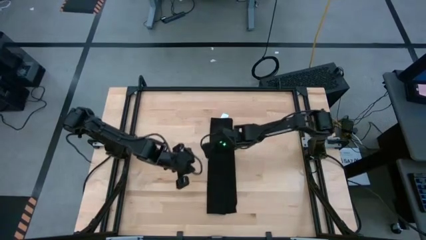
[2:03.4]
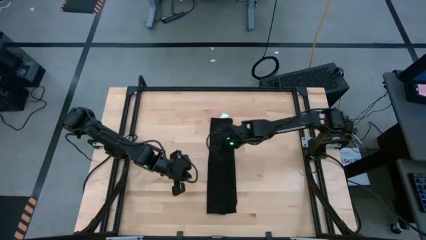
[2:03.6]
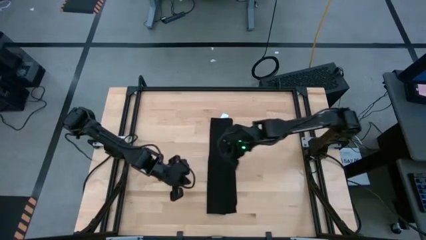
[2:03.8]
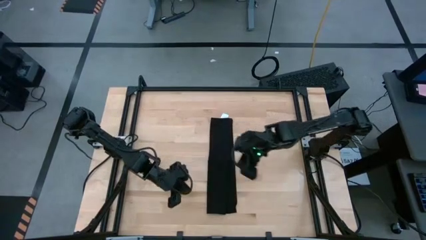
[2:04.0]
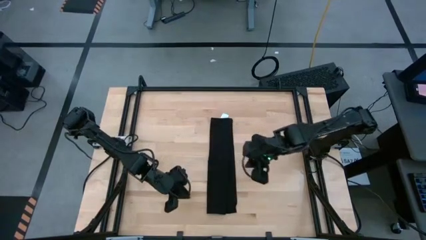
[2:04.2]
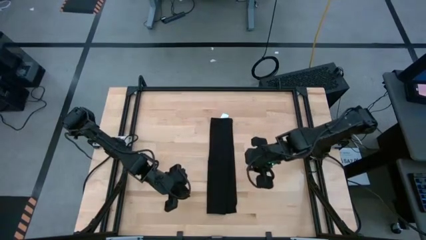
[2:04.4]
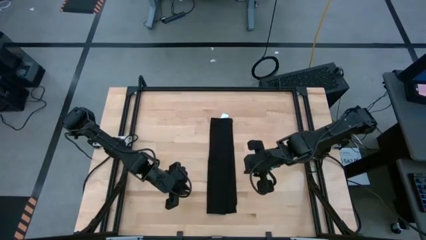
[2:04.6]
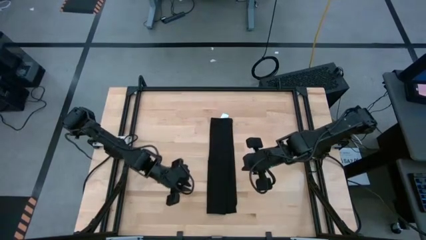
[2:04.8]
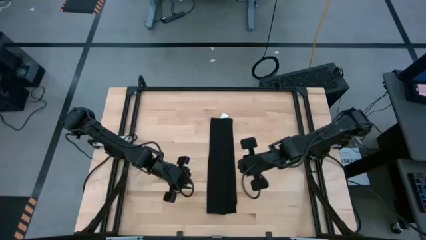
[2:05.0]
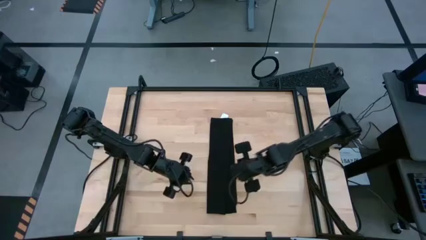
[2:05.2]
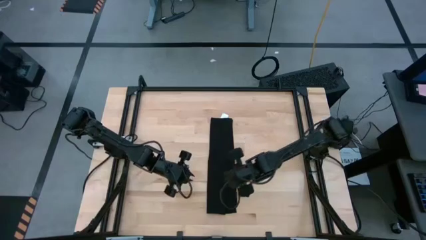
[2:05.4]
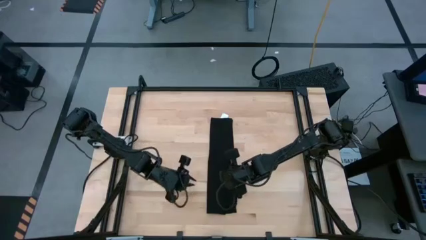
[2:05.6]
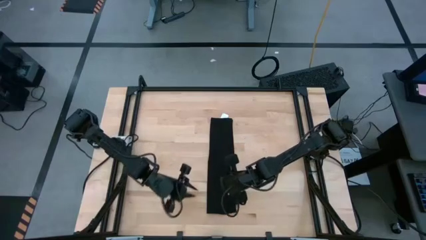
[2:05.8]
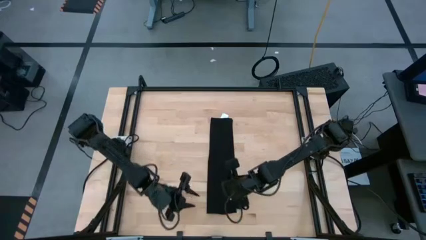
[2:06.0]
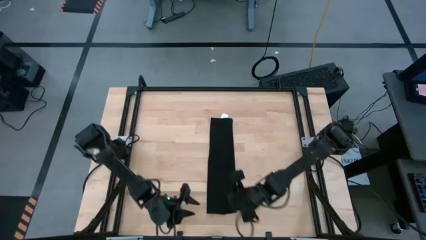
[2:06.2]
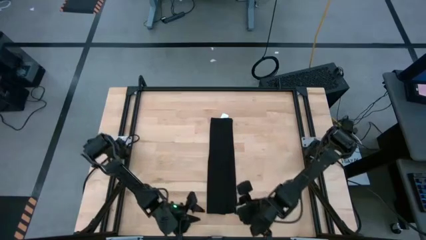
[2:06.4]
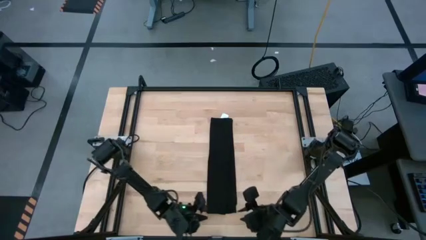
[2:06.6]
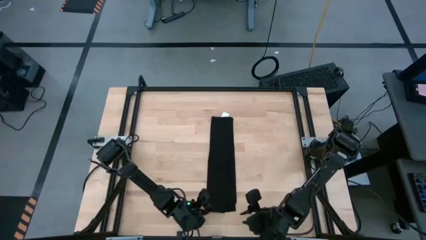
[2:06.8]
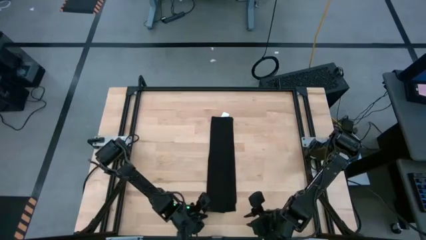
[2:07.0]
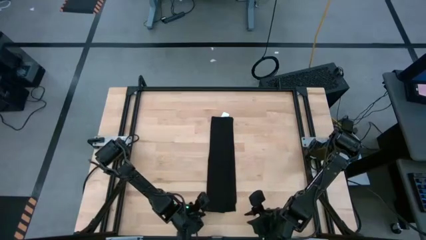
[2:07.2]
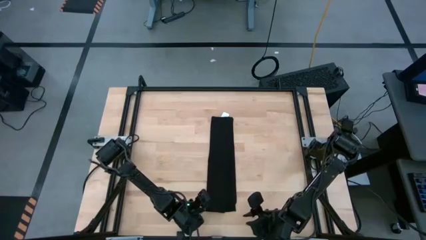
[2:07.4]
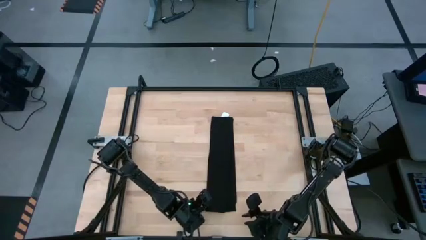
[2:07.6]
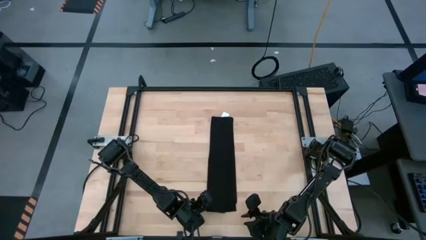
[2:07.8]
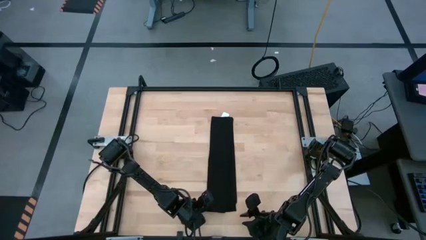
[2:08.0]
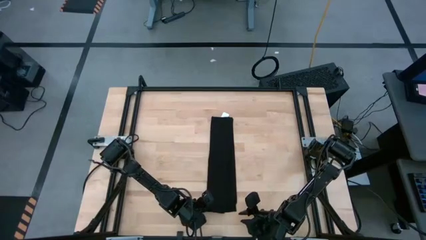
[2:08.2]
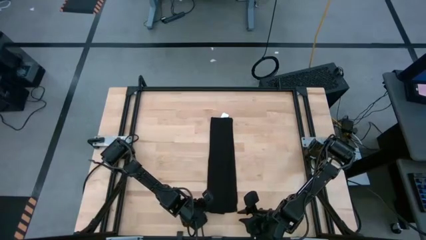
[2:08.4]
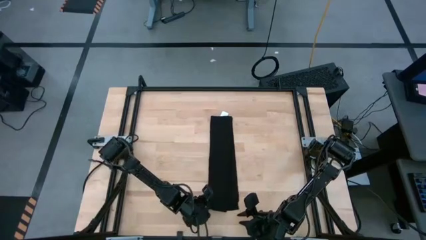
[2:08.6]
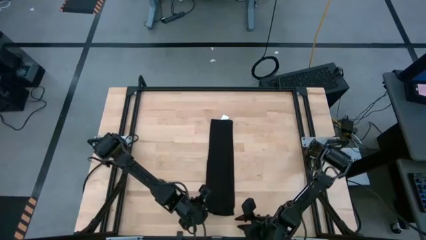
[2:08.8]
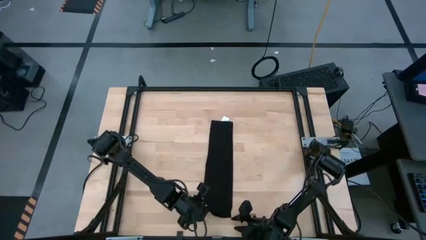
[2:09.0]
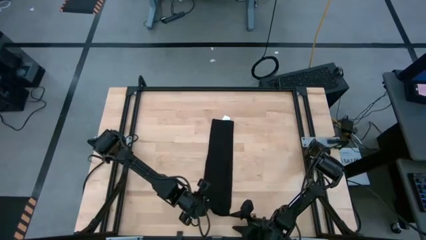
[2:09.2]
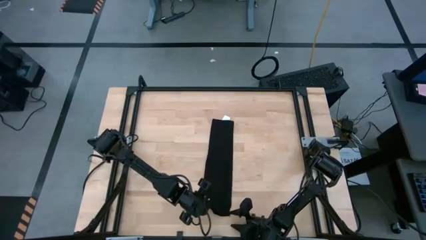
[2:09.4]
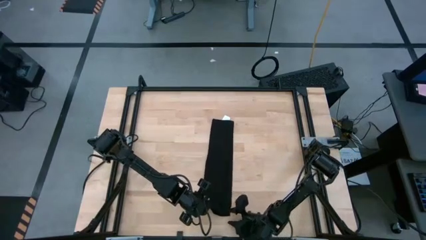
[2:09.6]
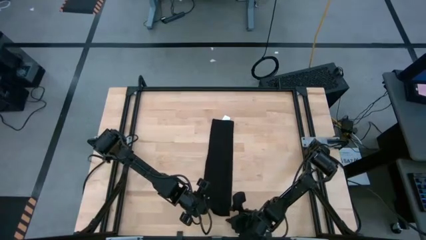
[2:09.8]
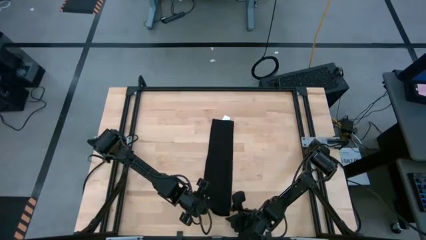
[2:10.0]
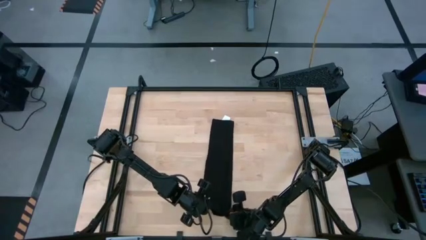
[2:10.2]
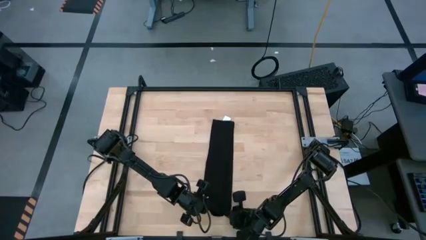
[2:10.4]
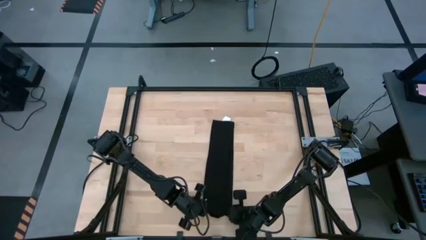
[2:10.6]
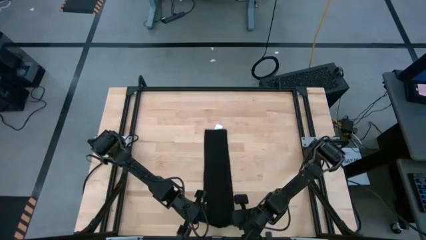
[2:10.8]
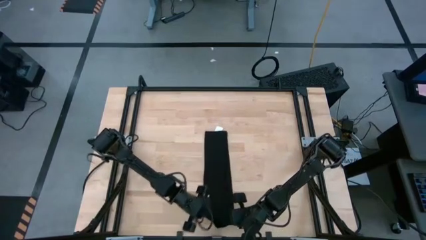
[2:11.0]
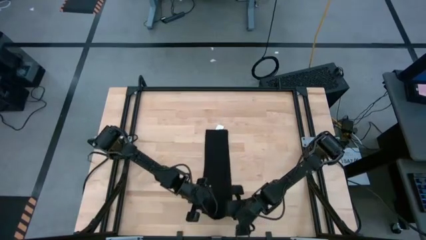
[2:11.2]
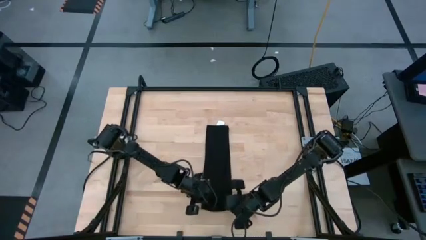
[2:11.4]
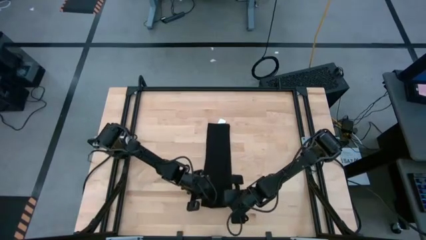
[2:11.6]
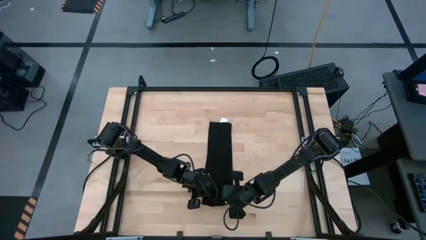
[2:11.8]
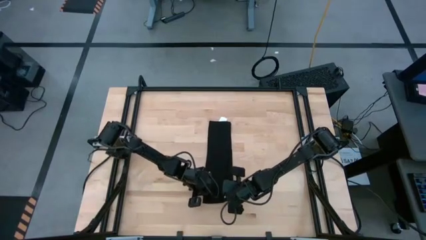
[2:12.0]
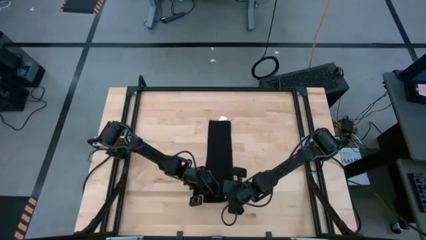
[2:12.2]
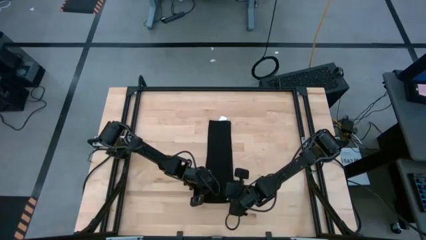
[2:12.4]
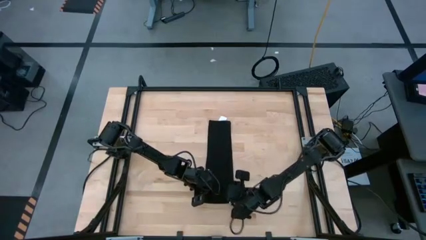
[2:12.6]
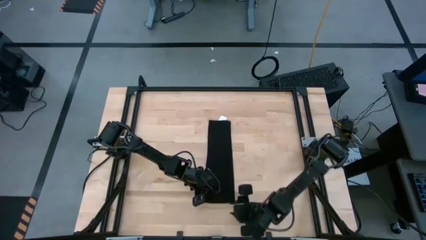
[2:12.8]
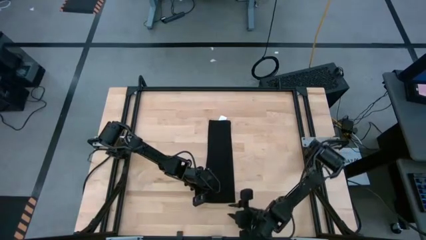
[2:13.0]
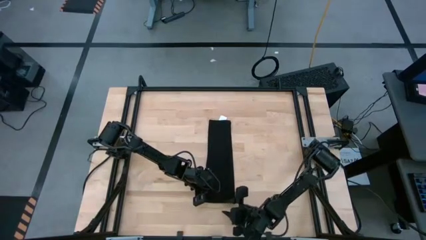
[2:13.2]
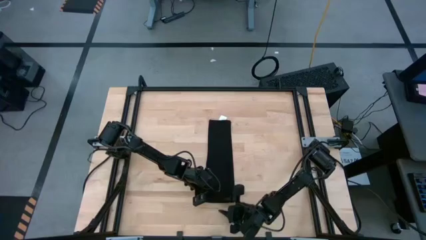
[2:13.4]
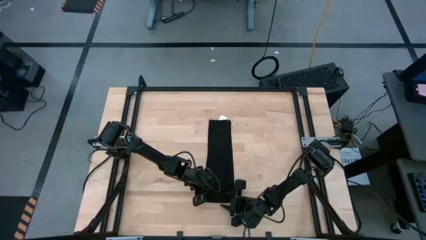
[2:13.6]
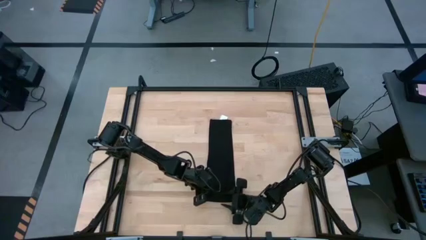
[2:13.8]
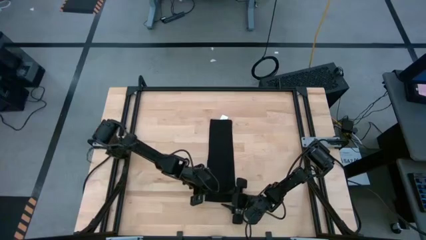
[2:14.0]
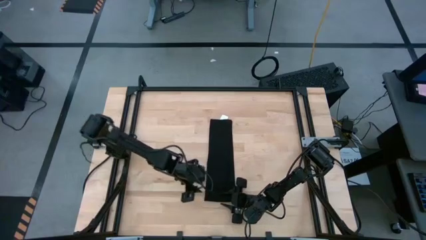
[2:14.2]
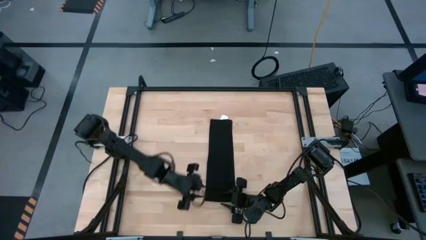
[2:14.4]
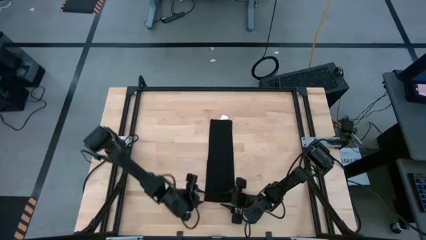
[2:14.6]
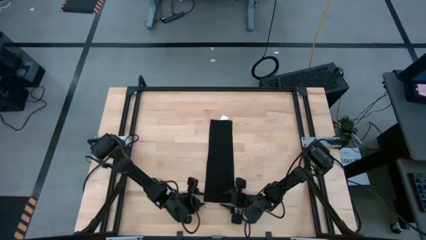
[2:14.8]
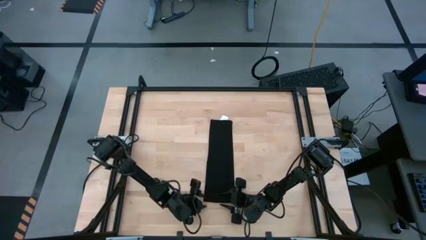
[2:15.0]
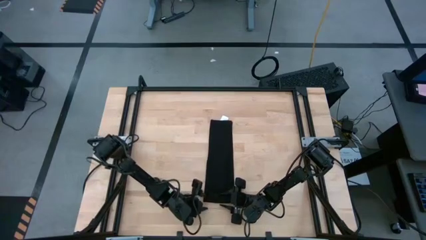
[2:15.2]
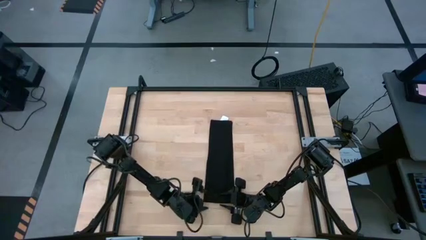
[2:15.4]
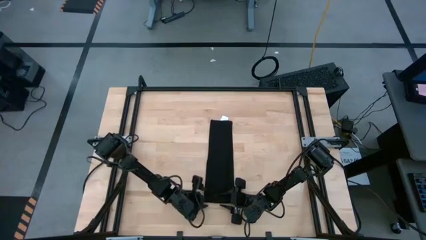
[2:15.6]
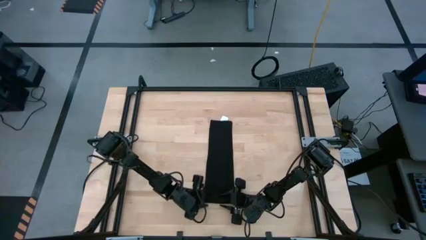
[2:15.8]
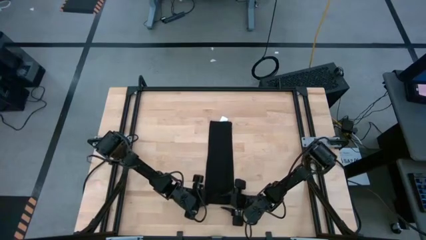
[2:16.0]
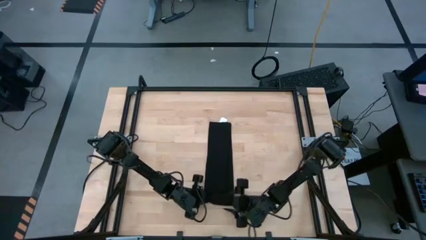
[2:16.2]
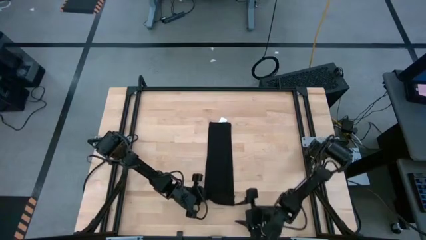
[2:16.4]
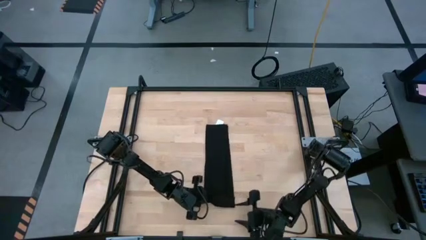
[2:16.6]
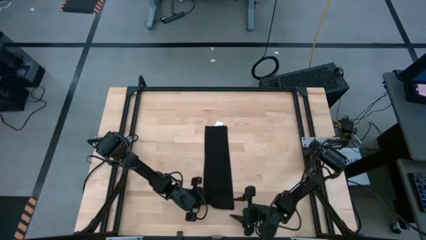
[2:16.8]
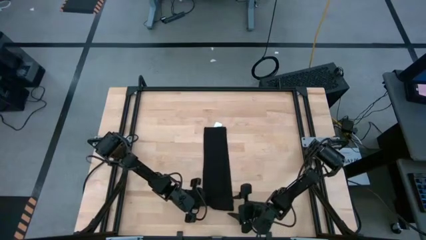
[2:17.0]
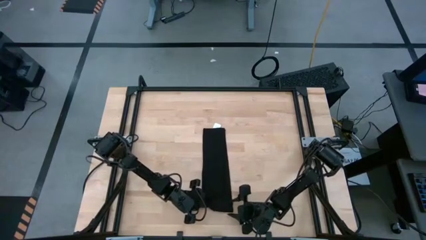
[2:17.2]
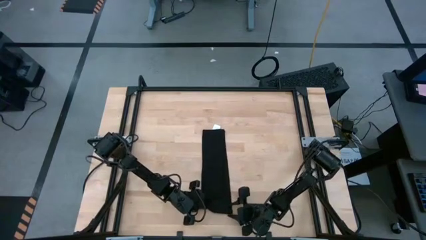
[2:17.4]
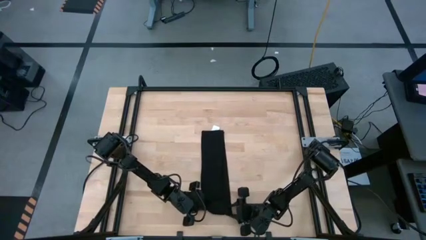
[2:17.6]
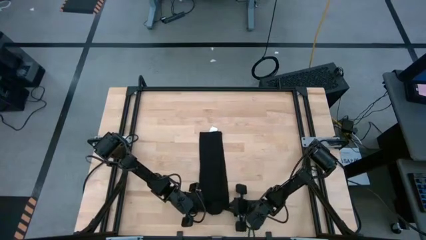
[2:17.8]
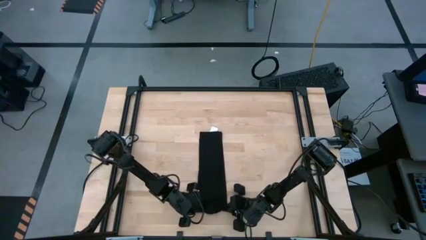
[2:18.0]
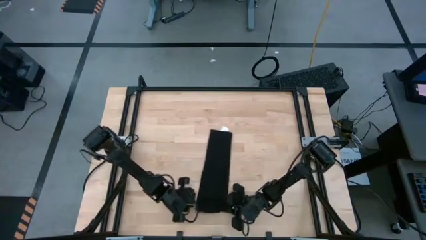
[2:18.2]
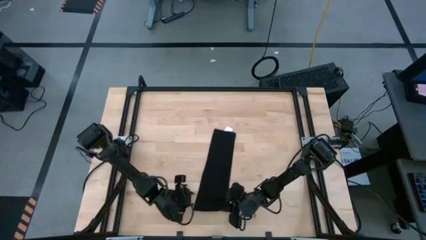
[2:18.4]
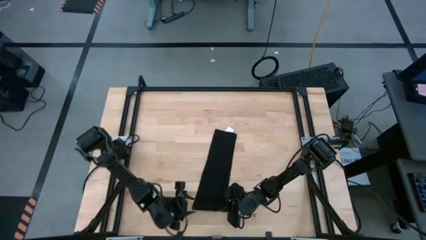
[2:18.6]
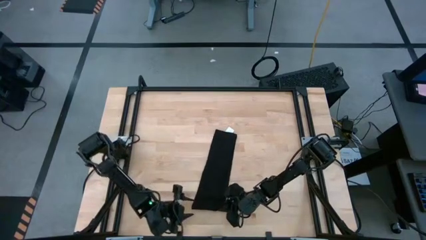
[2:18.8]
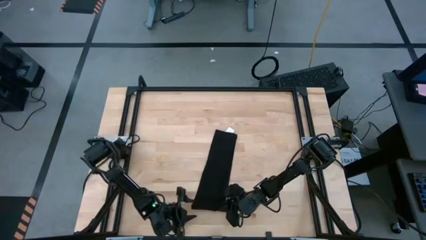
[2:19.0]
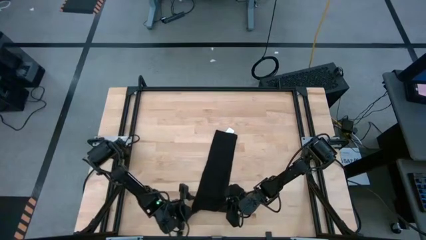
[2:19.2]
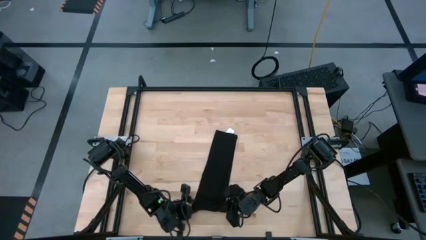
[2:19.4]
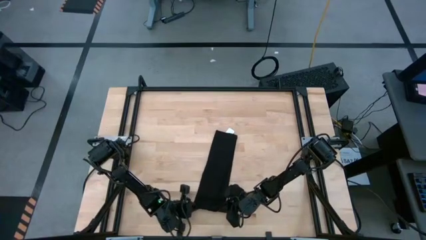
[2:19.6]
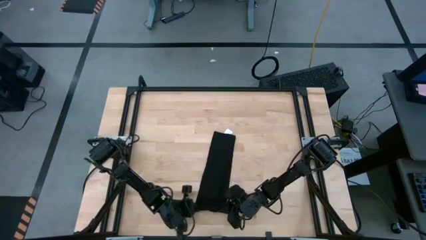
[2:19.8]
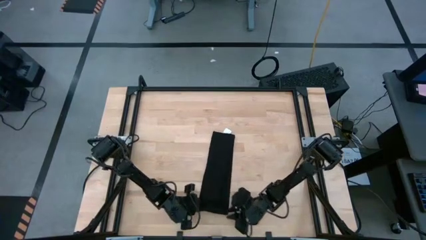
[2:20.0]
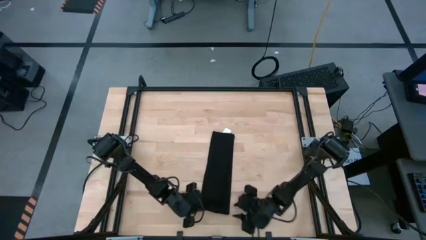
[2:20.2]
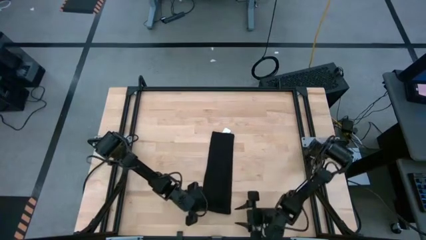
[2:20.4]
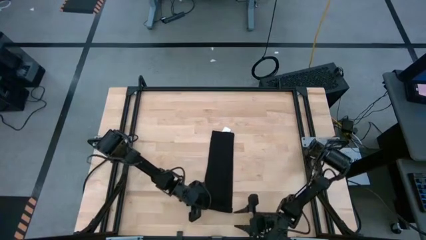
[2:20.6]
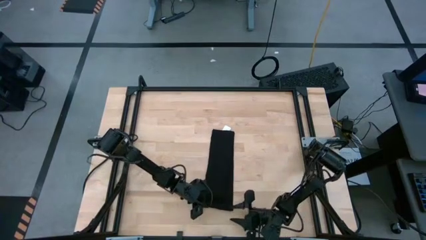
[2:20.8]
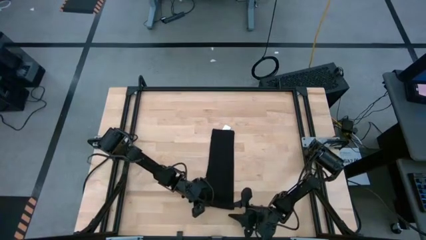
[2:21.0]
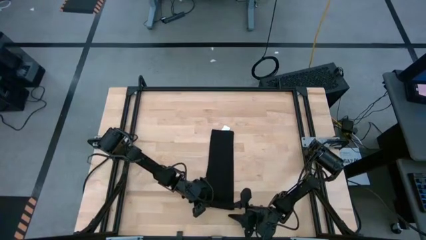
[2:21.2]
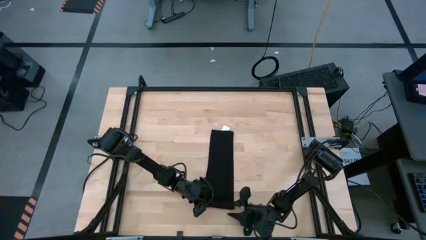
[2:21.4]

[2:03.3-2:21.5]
Task: Roll napkin
Roll the black napkin
